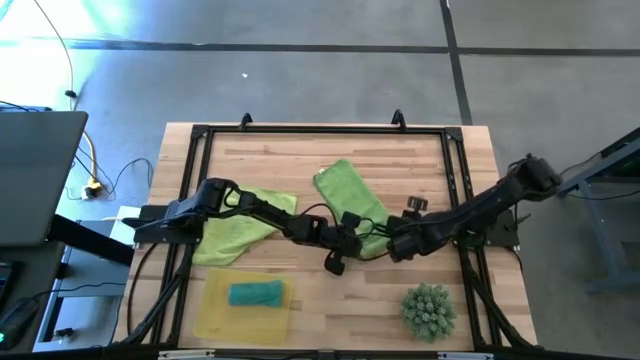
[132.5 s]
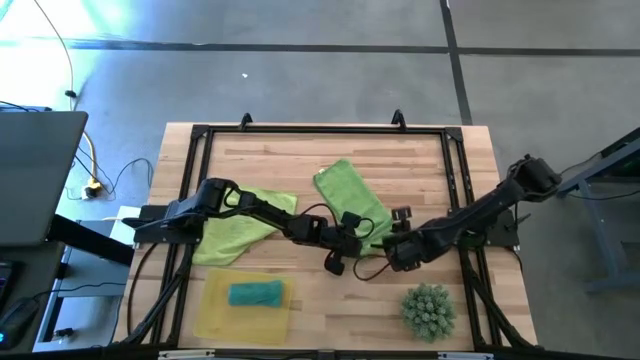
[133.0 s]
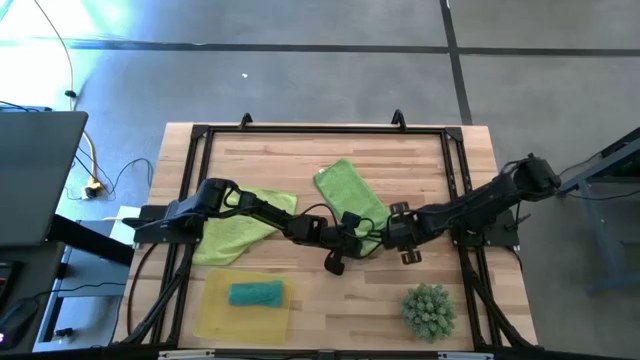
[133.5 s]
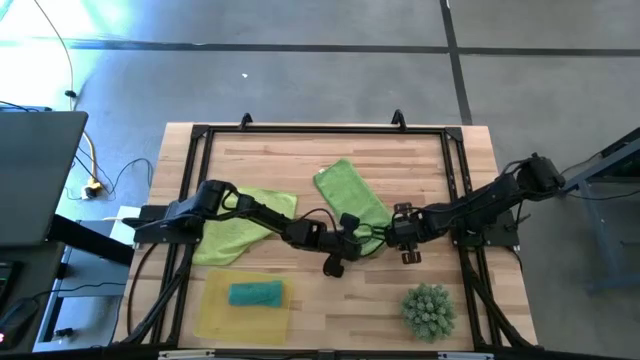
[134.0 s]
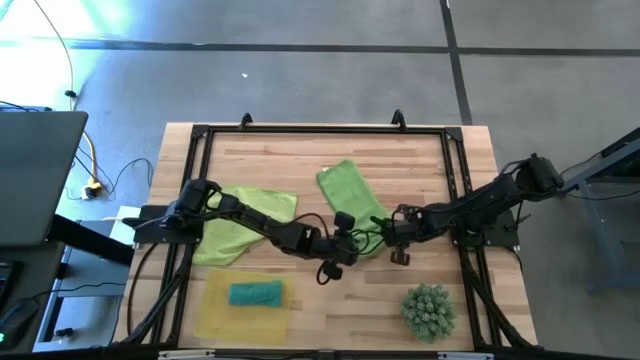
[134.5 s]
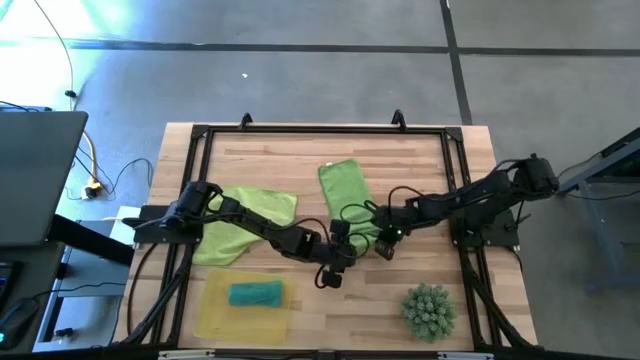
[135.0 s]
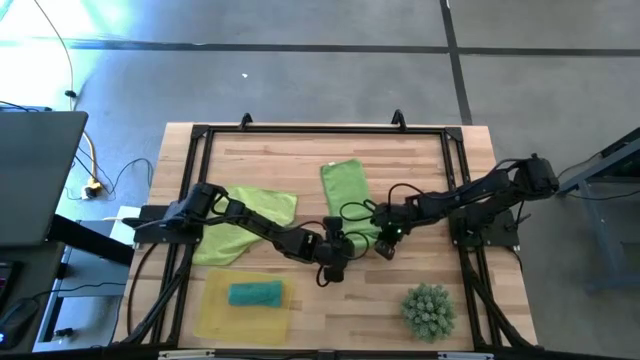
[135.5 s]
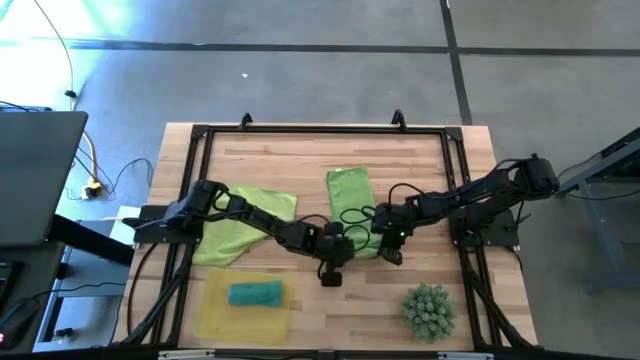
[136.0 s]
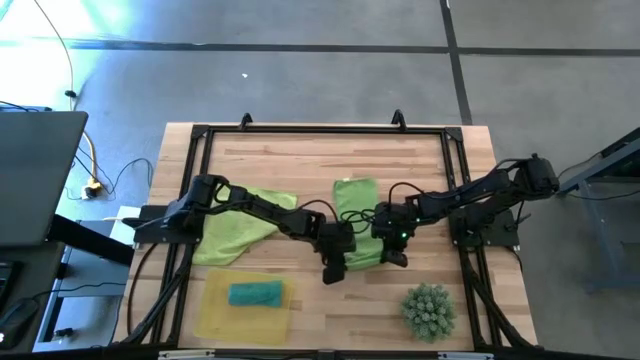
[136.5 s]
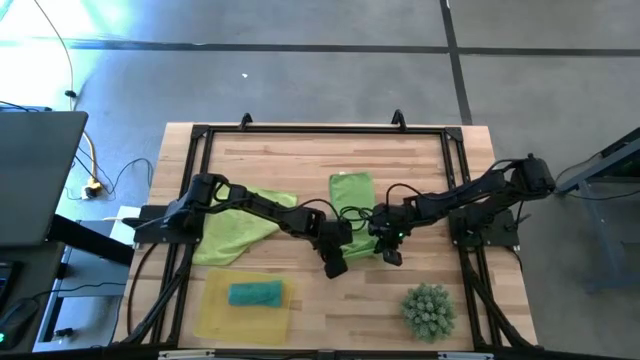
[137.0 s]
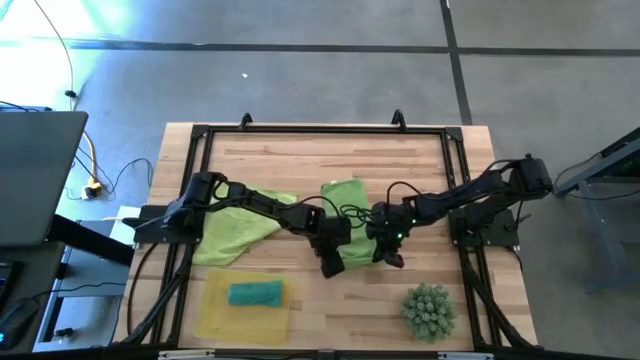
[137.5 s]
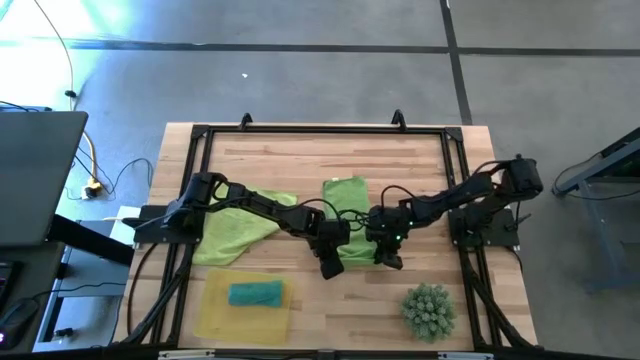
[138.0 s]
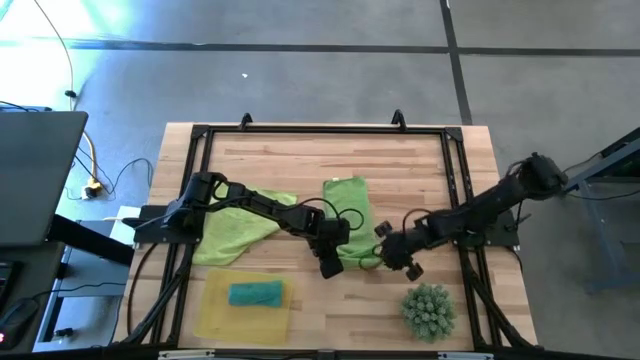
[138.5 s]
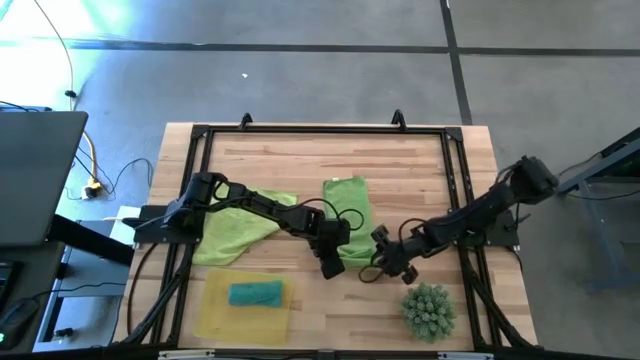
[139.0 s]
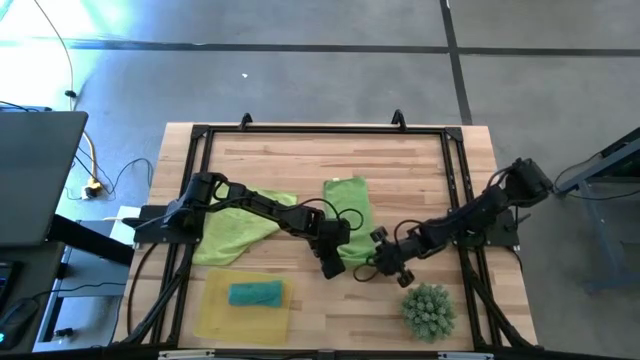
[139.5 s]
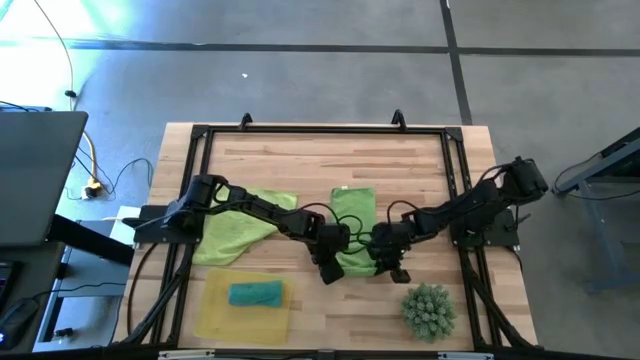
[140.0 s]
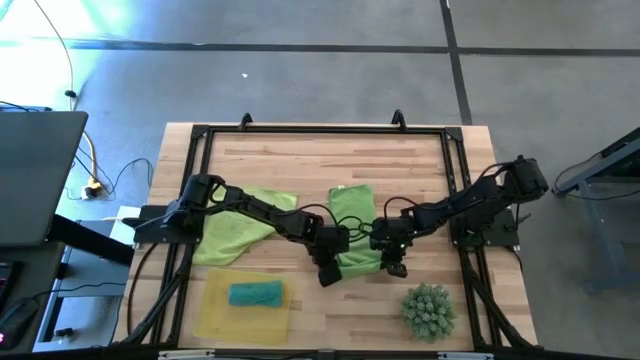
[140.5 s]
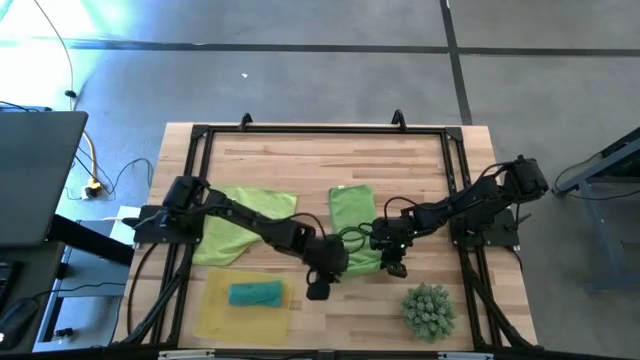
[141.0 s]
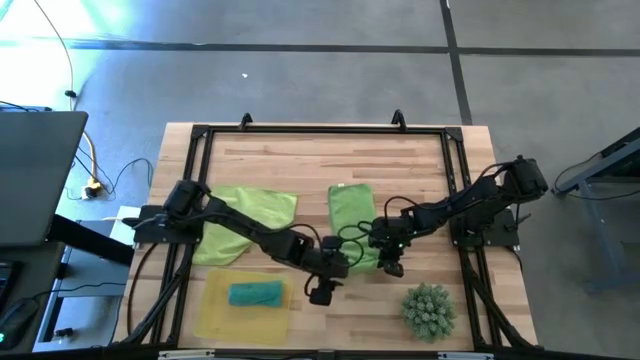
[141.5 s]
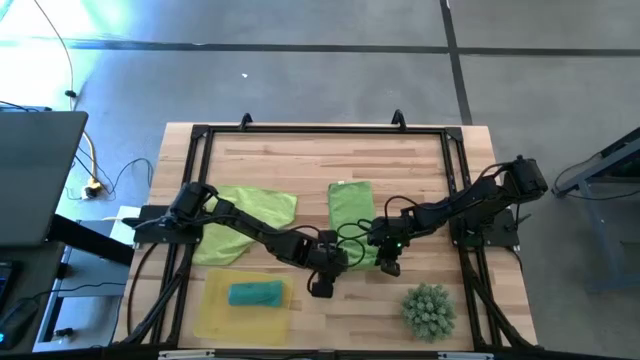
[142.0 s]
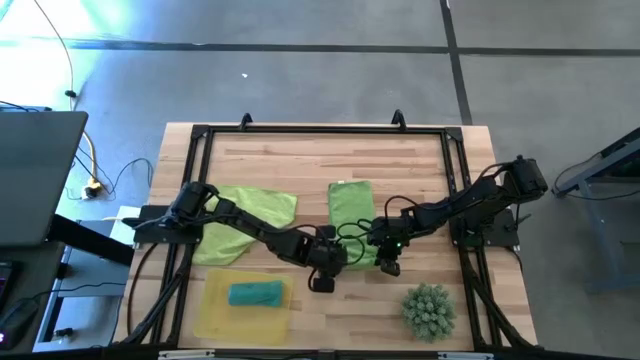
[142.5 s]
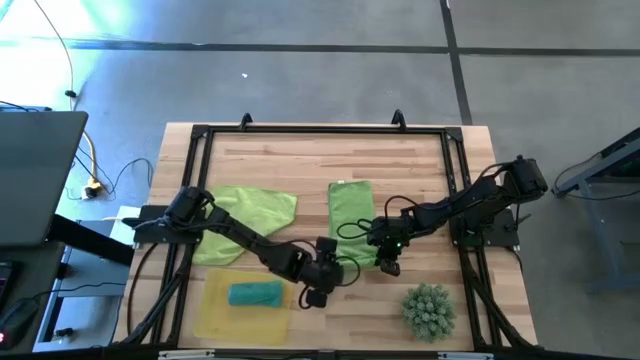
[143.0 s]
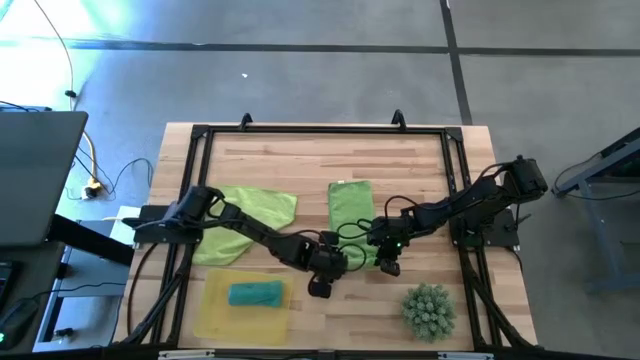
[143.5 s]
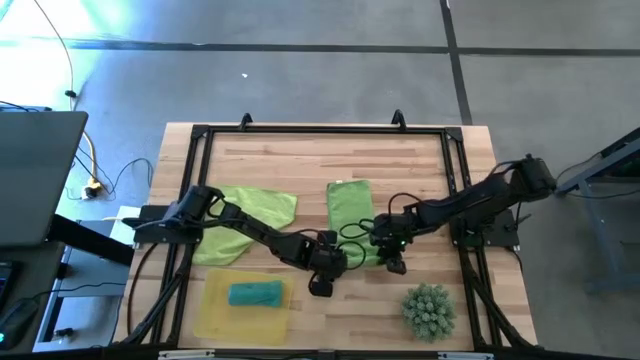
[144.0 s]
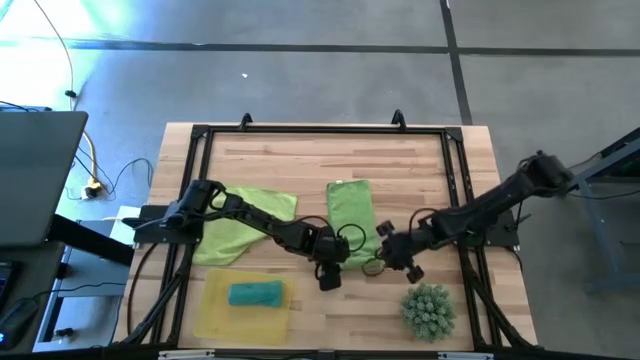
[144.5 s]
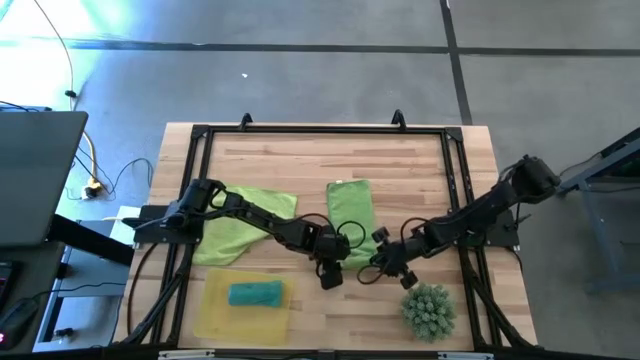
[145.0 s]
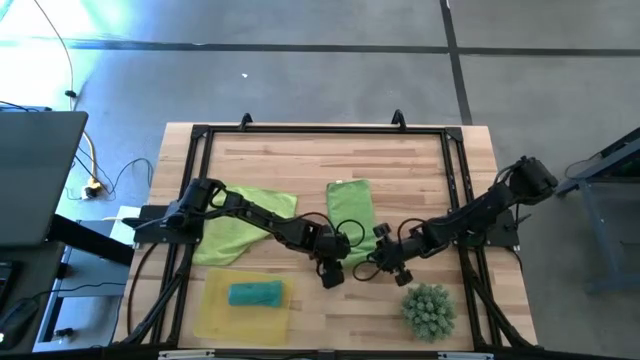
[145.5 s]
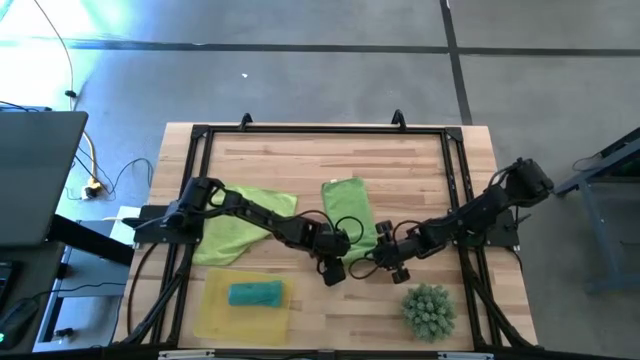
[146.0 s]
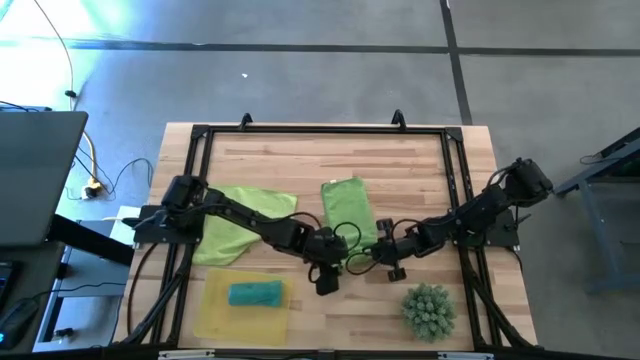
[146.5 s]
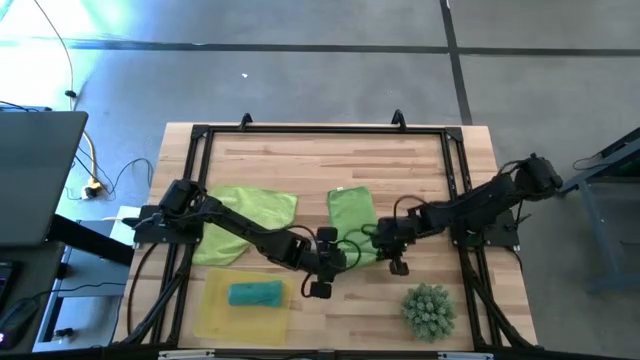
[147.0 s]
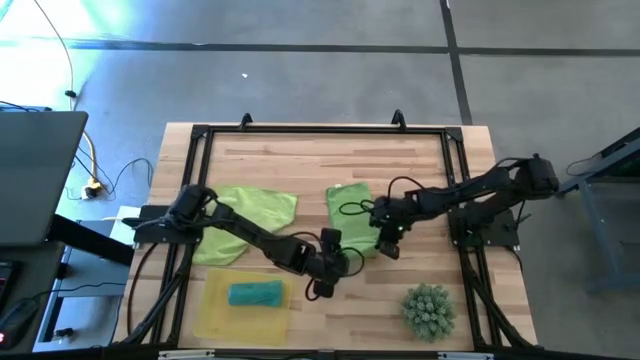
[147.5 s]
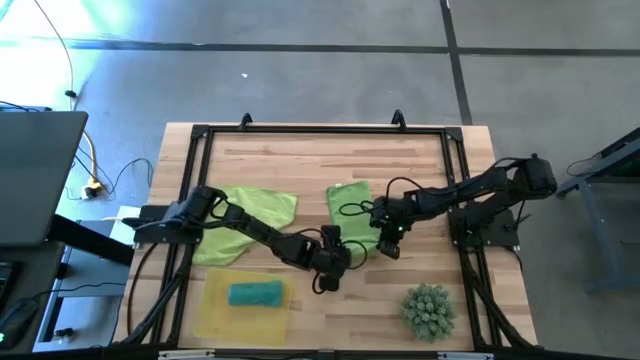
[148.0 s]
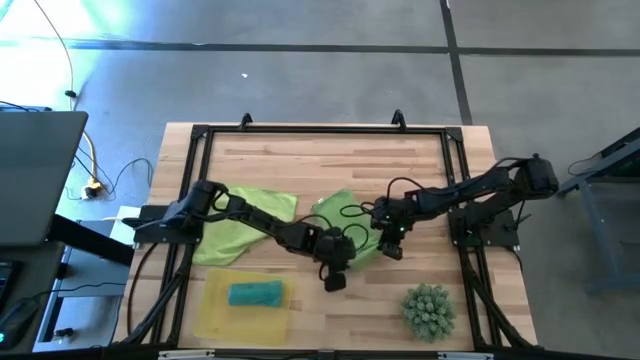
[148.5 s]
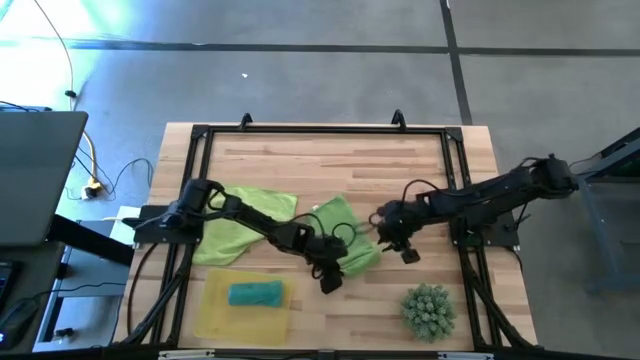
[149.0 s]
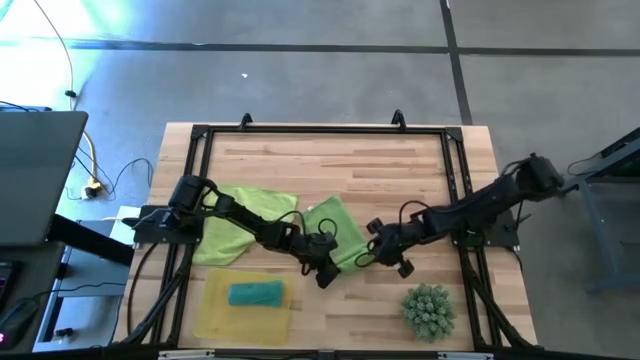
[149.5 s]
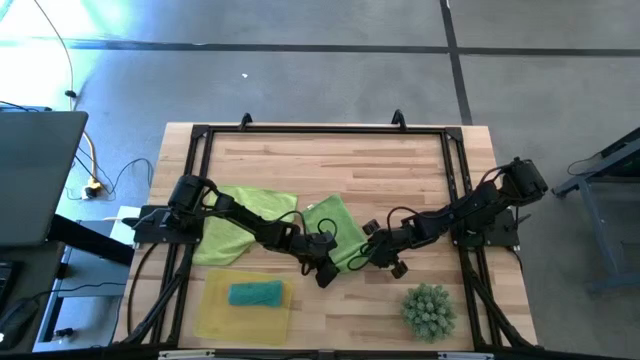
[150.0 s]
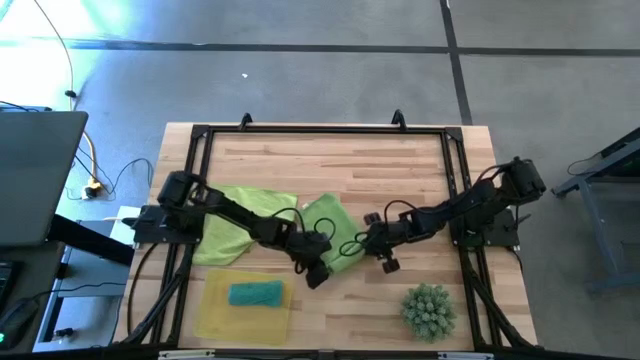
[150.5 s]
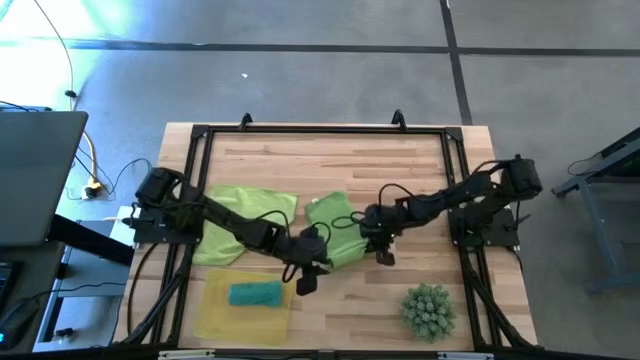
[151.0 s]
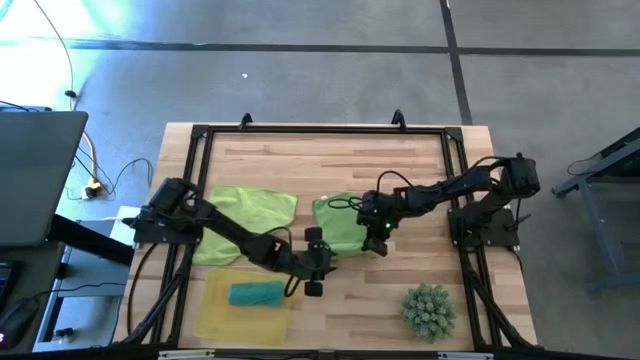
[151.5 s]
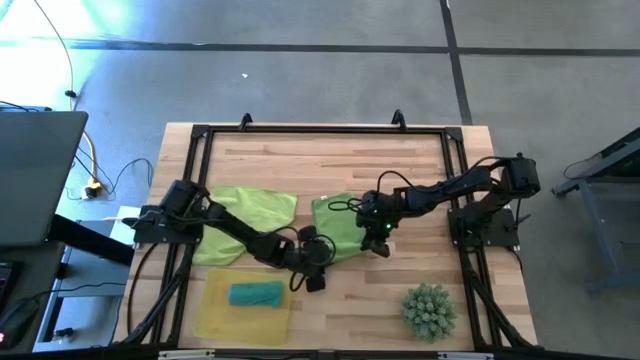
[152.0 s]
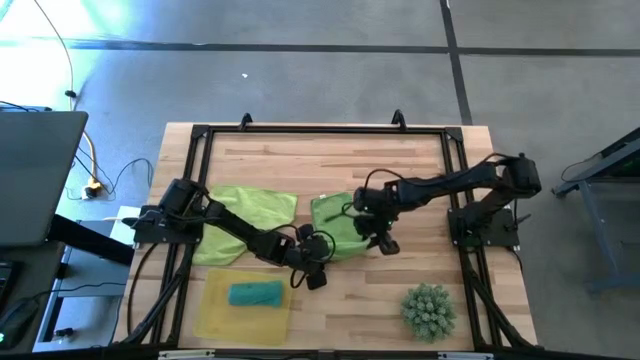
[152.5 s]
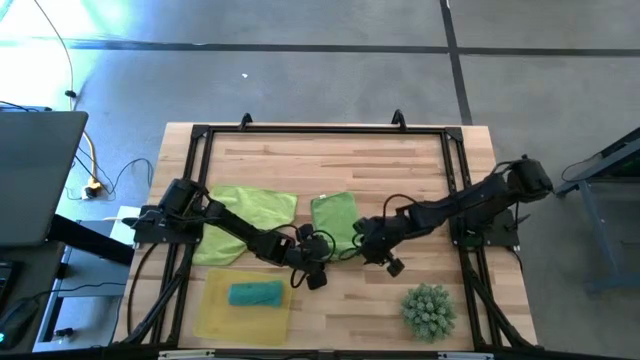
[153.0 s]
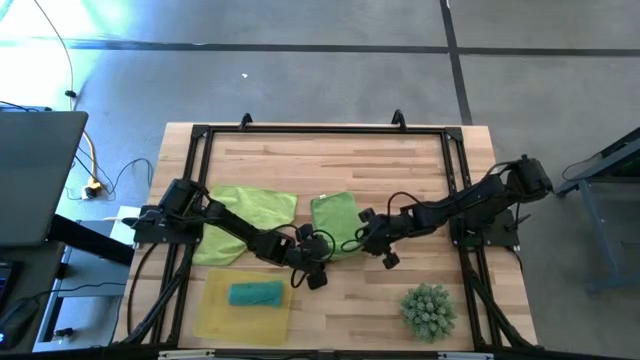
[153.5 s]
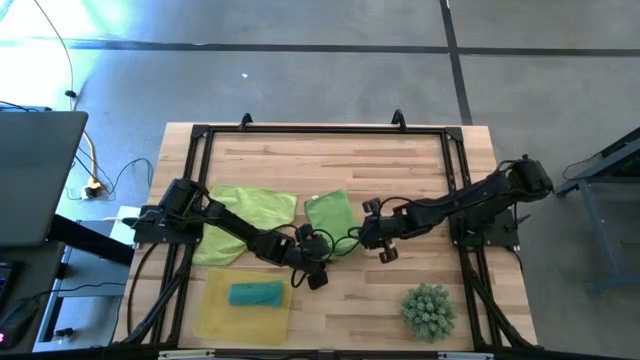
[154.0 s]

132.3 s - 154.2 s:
Task: Roll microfiber towels into tight, uniform cylinder then place into a basket
Roll the green microfiber towel
